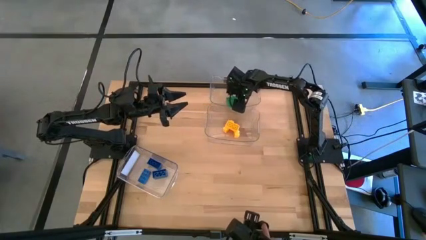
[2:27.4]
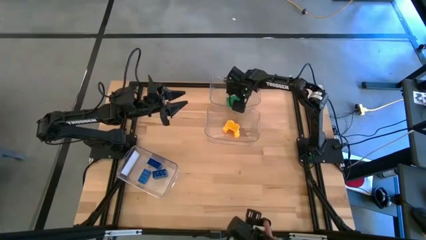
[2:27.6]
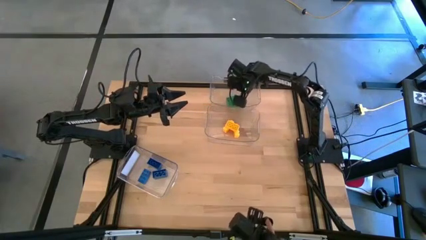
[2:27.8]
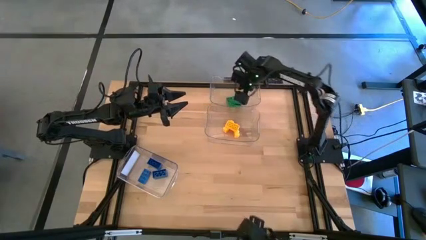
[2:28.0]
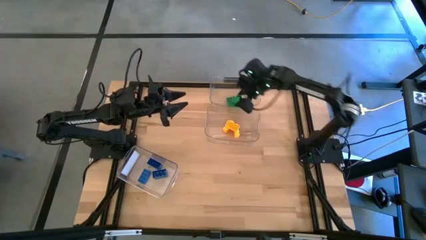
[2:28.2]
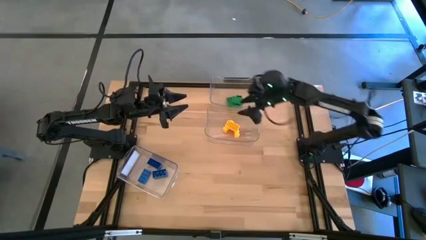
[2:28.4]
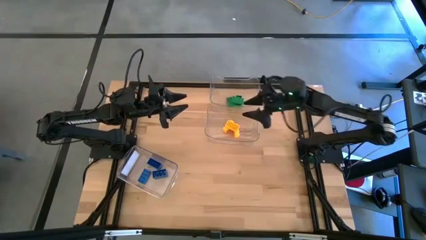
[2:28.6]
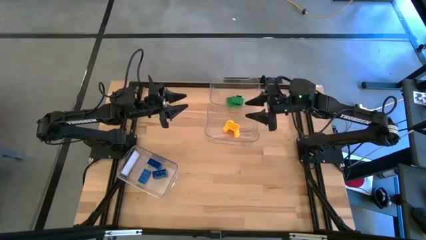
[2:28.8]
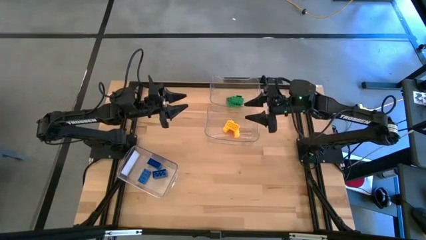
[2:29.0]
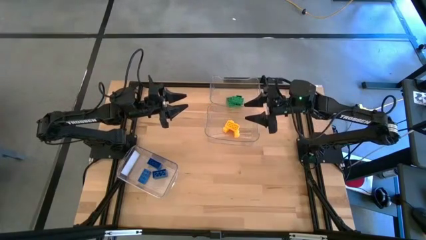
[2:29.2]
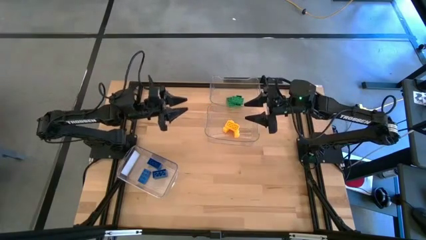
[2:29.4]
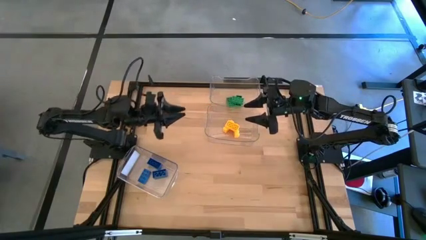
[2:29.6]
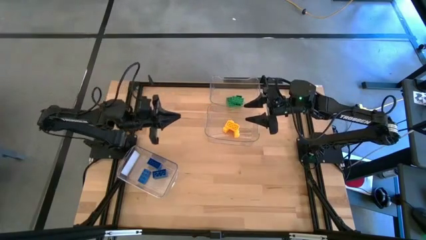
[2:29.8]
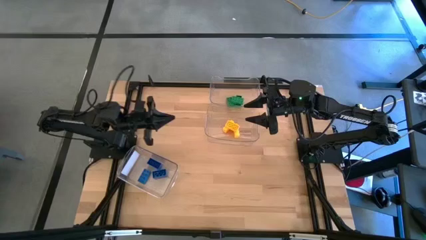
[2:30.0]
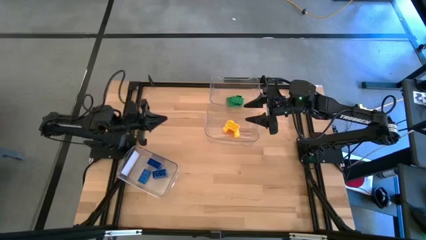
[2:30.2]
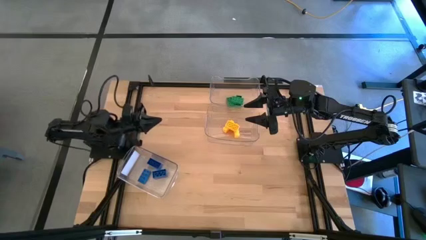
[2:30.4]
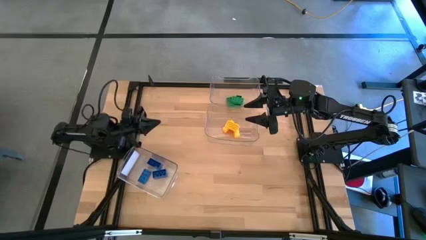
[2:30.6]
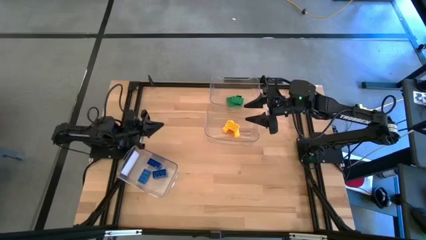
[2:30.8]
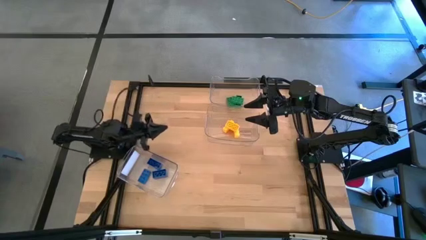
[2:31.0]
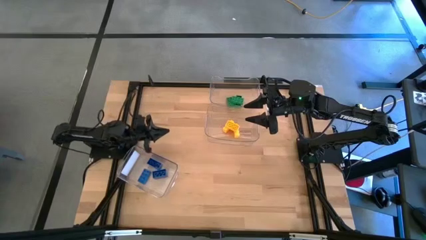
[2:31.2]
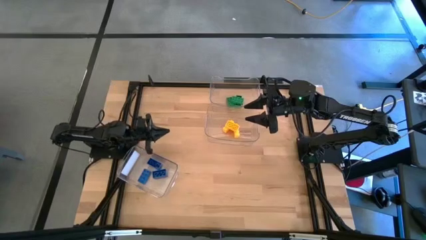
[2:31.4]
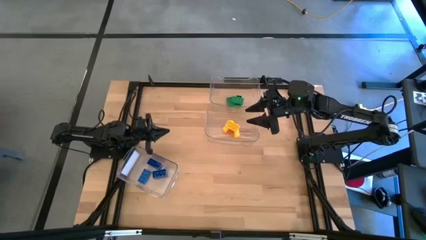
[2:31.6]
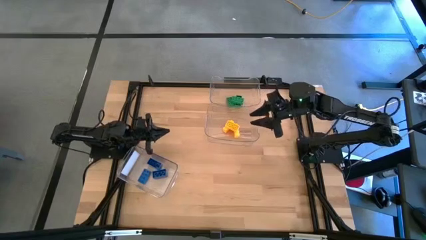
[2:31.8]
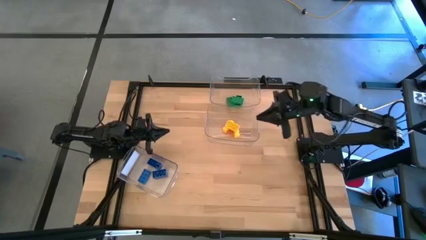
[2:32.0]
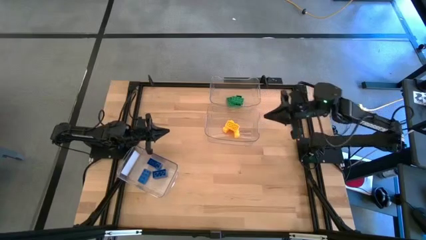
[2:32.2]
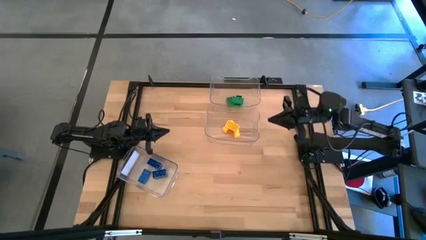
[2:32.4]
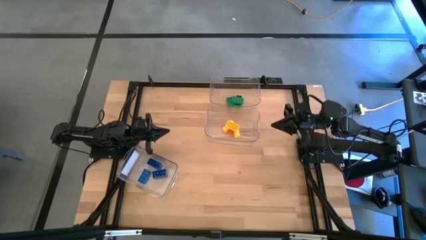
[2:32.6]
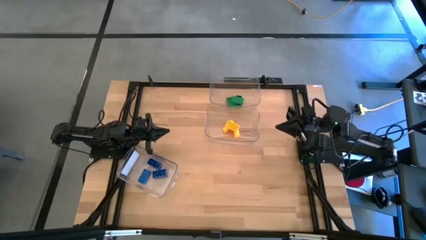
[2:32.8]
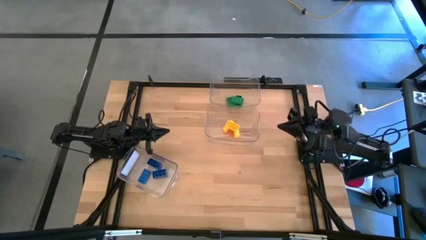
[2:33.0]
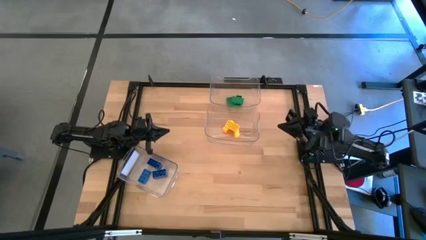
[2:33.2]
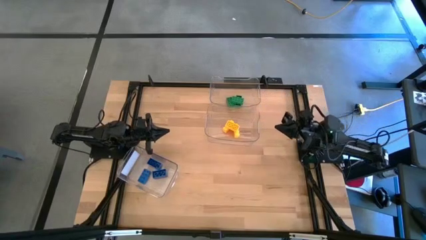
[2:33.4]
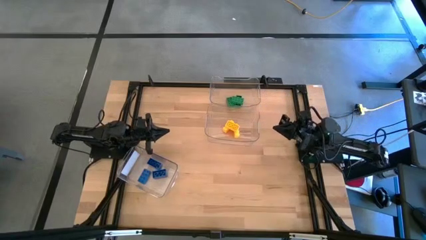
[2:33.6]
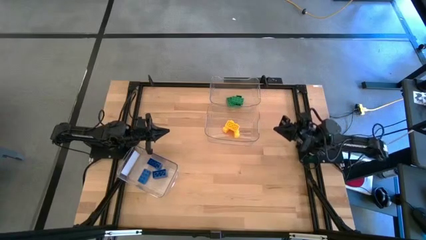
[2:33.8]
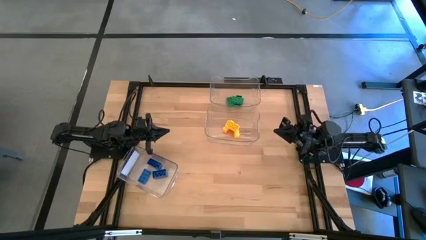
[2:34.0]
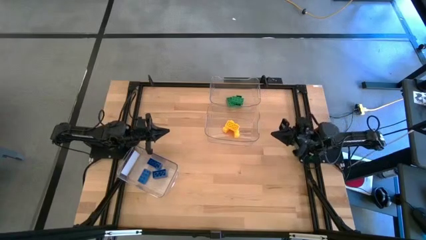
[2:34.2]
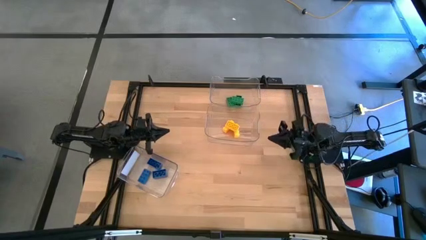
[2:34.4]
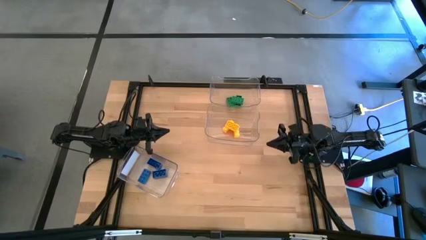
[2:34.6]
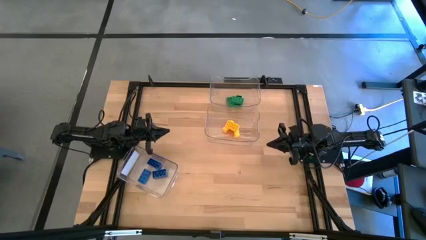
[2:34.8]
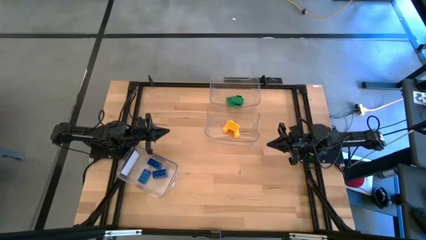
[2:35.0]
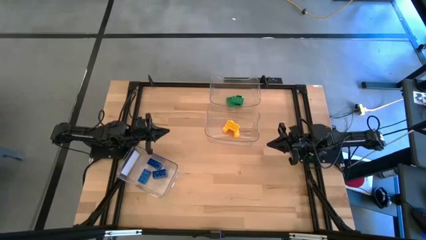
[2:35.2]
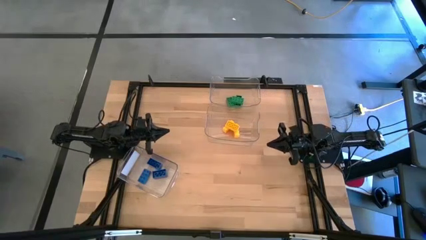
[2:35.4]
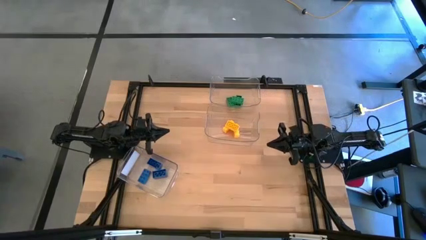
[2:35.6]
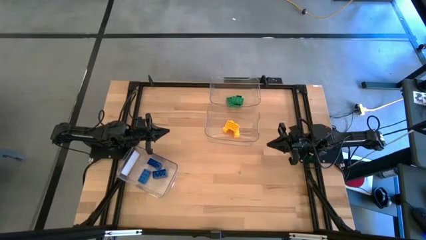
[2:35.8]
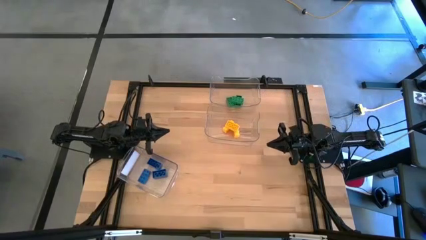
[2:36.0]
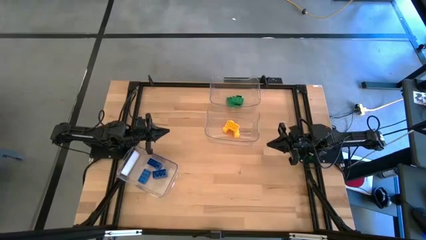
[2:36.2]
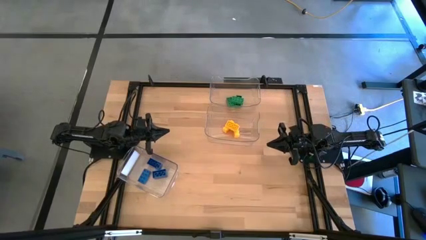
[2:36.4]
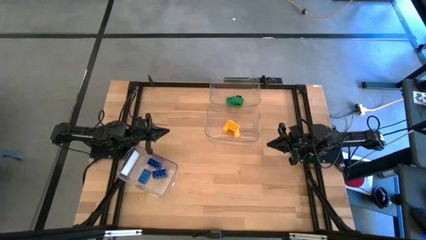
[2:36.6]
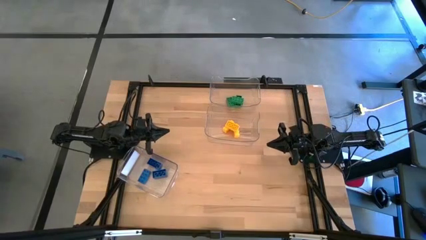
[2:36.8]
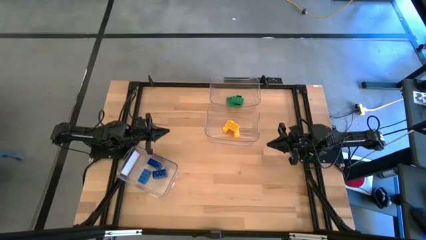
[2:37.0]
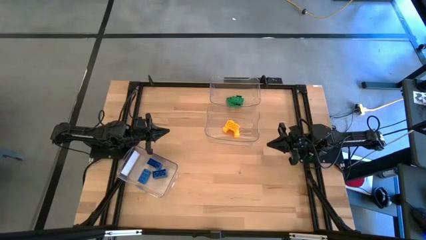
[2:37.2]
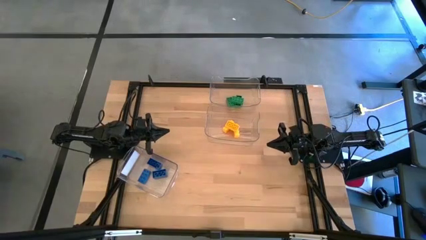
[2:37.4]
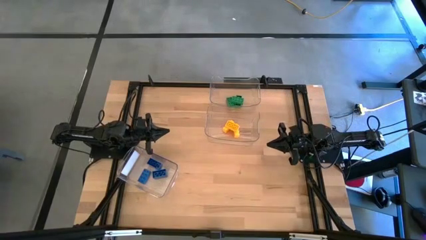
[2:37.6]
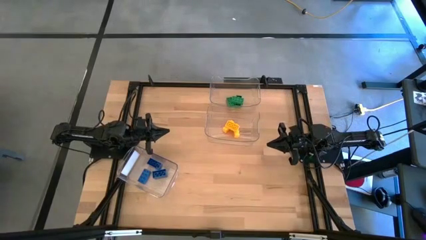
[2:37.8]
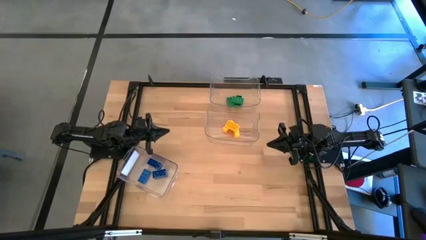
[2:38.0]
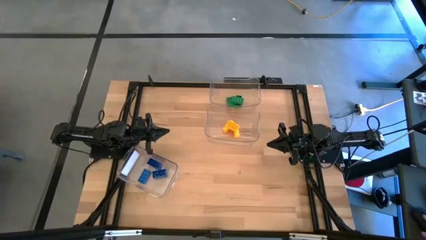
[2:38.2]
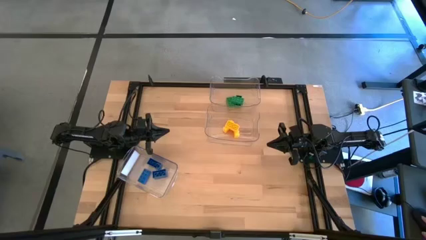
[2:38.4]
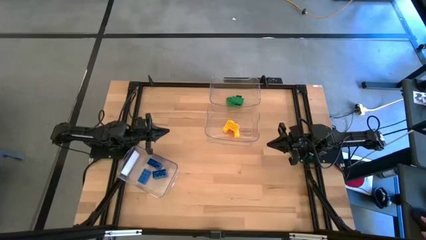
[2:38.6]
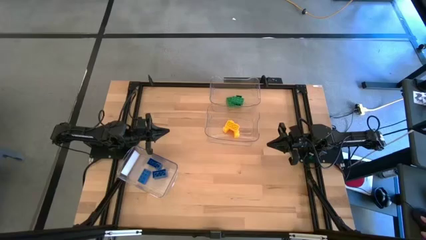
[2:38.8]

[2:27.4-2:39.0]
Task: Sort & place blocks by color
Return to Home Position
